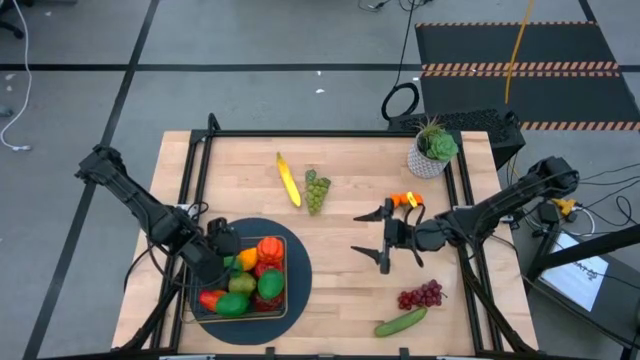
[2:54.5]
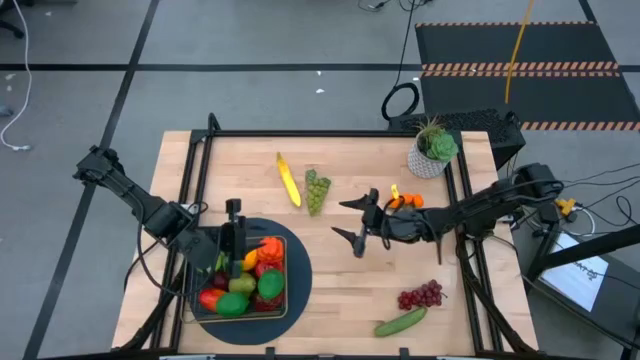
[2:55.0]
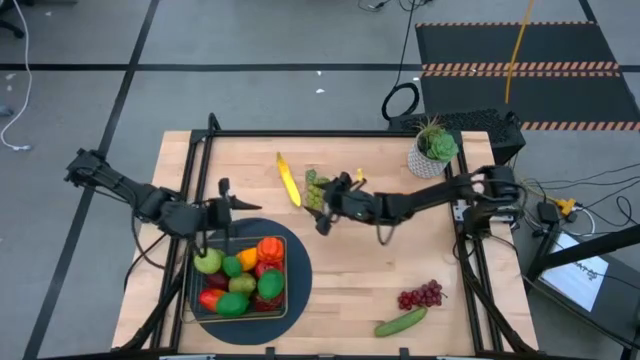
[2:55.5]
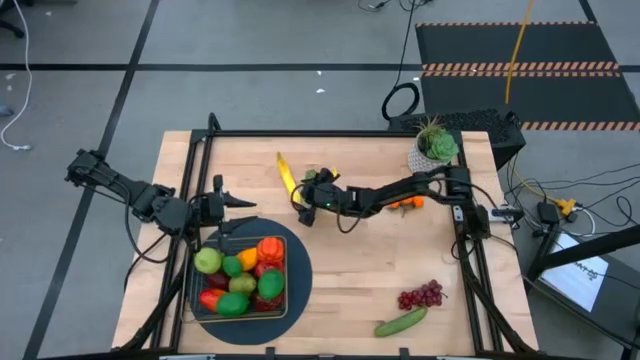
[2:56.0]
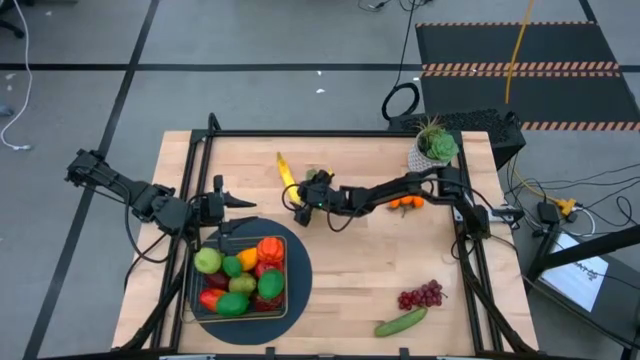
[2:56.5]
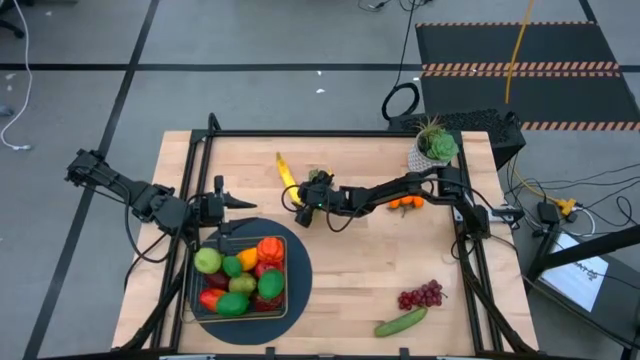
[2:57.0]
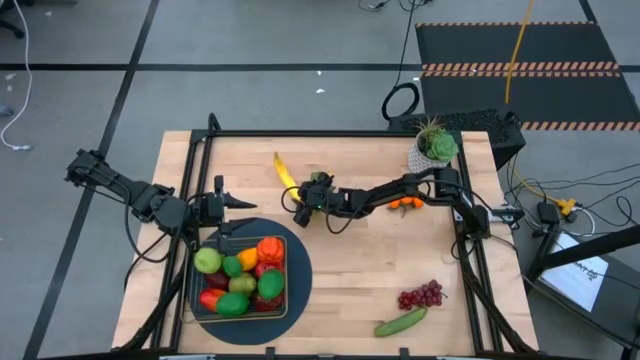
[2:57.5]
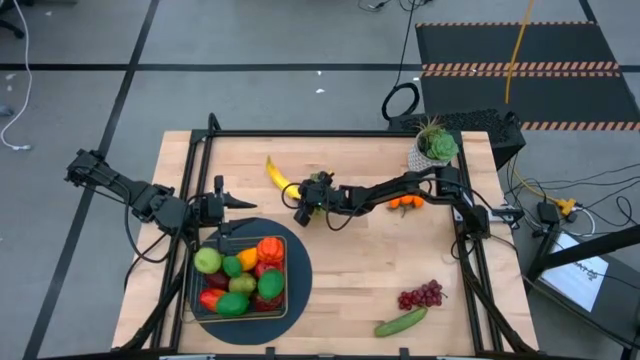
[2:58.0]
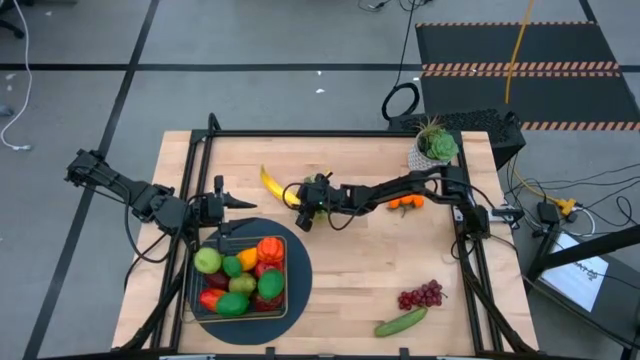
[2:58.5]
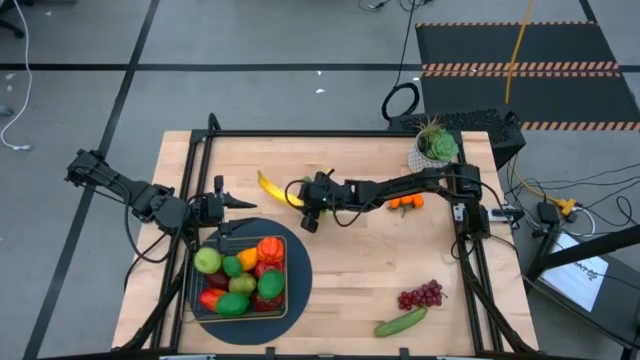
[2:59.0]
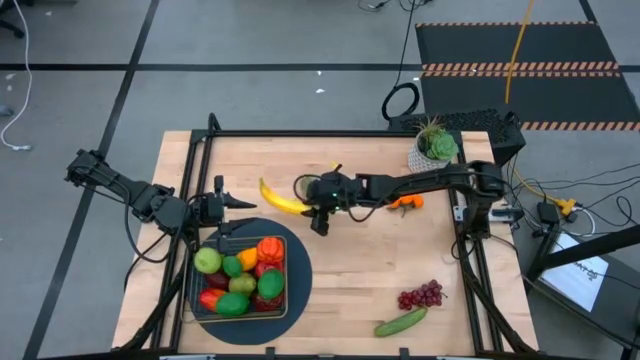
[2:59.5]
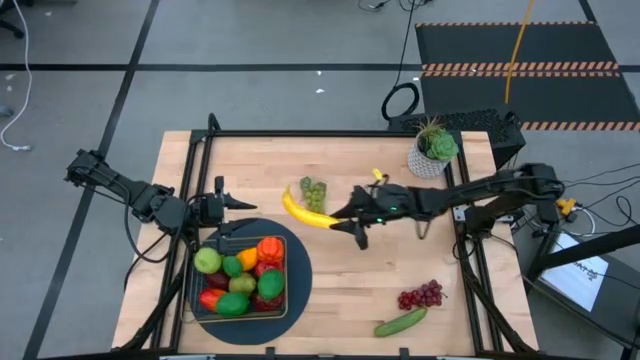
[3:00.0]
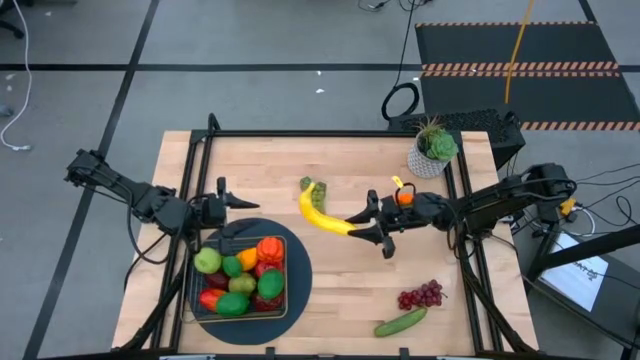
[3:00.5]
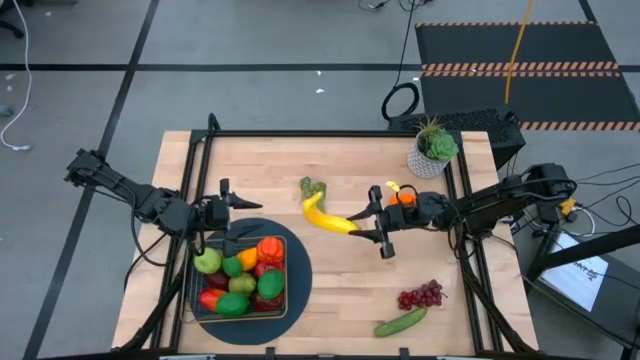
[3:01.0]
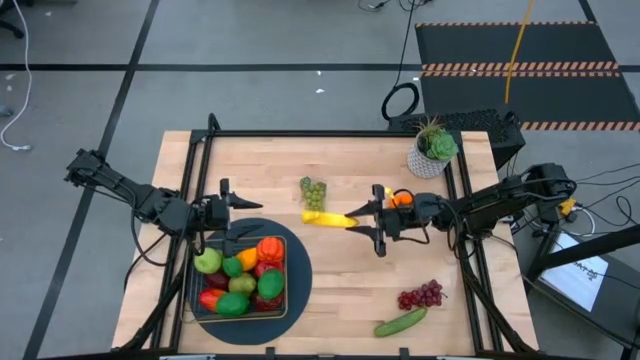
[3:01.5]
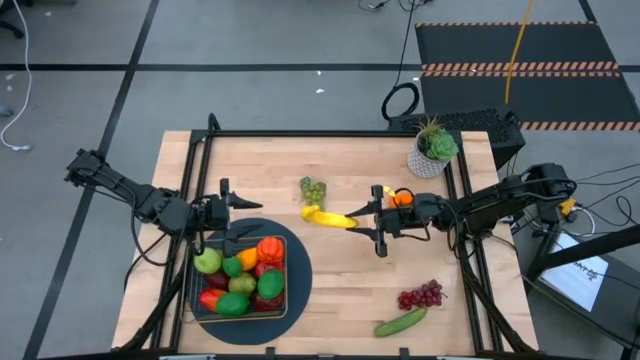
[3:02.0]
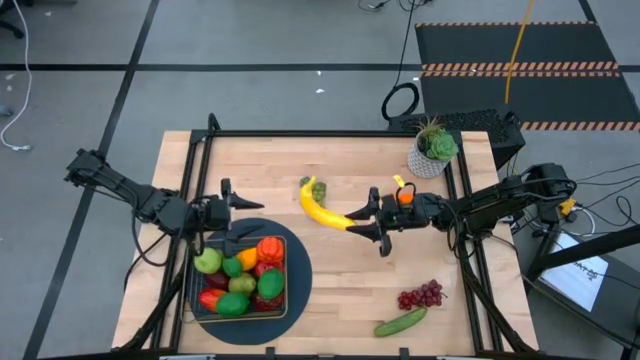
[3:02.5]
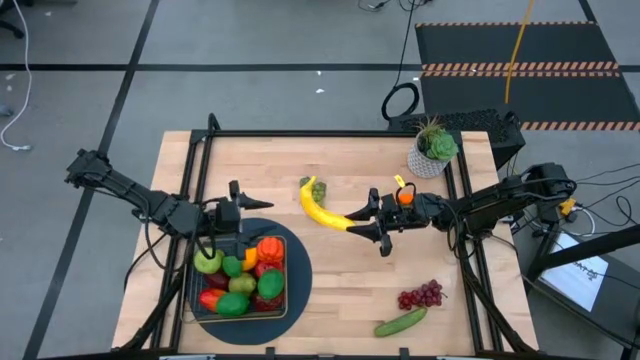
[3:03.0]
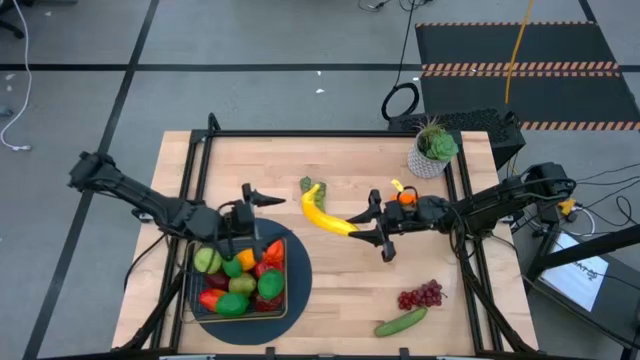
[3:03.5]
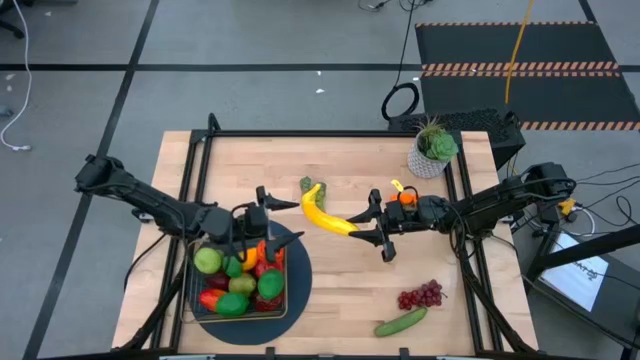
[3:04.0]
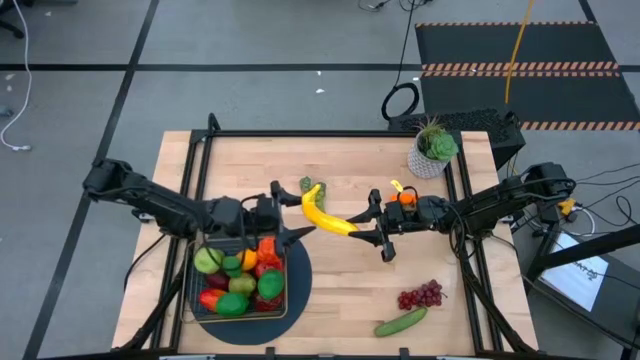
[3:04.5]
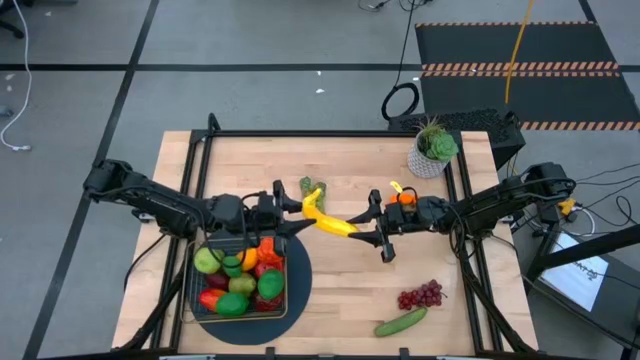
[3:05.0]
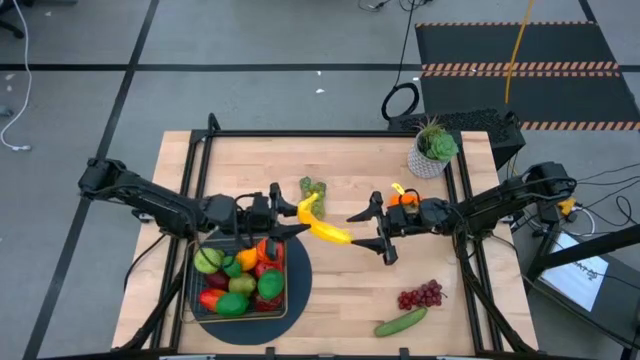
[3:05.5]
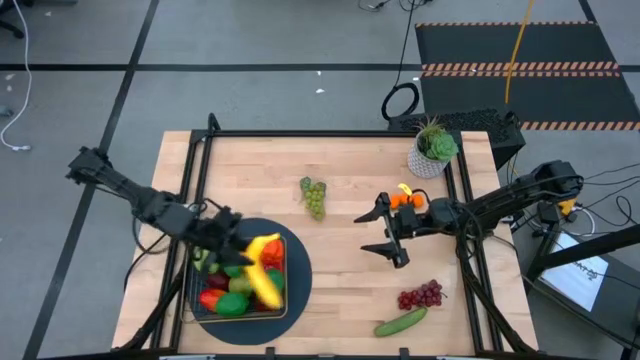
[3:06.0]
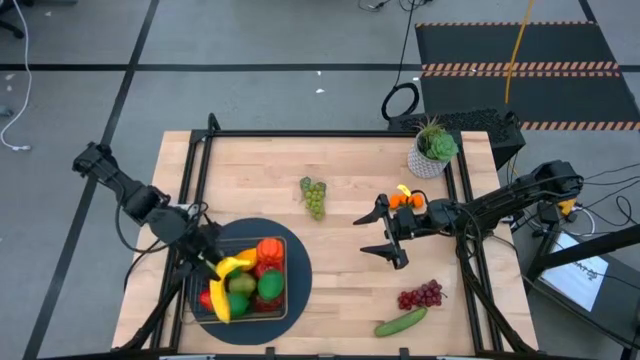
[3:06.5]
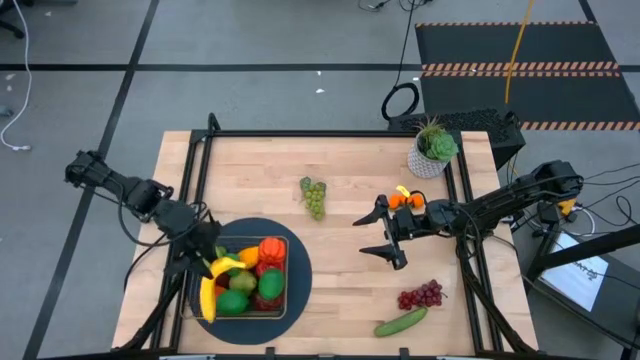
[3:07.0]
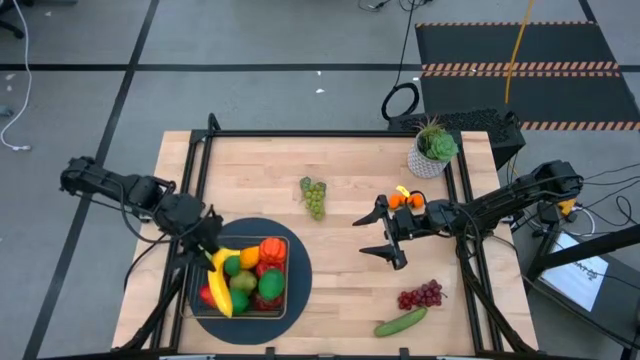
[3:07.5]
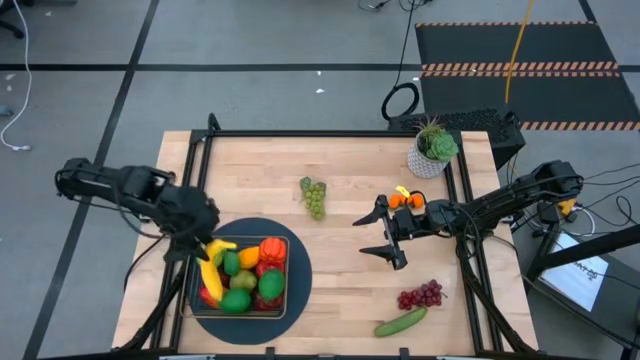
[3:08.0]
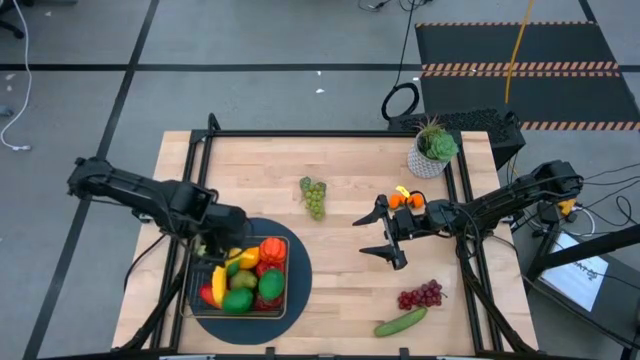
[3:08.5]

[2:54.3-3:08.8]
Task: Build produce basket
Put the banana into the gold wire basket

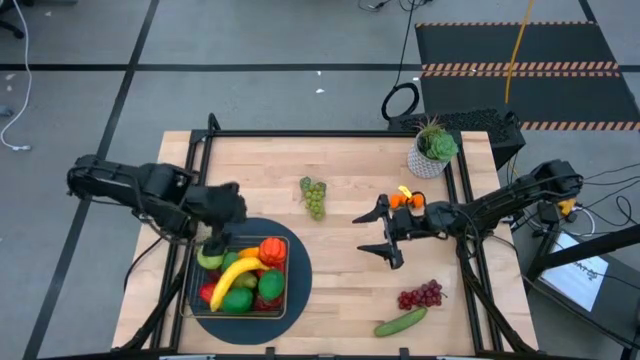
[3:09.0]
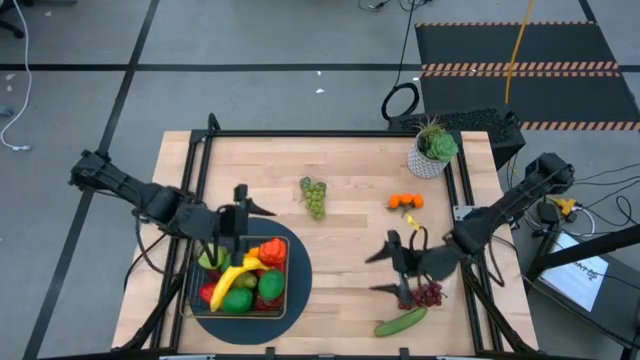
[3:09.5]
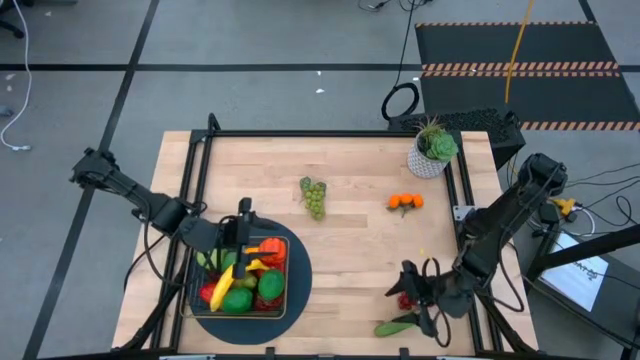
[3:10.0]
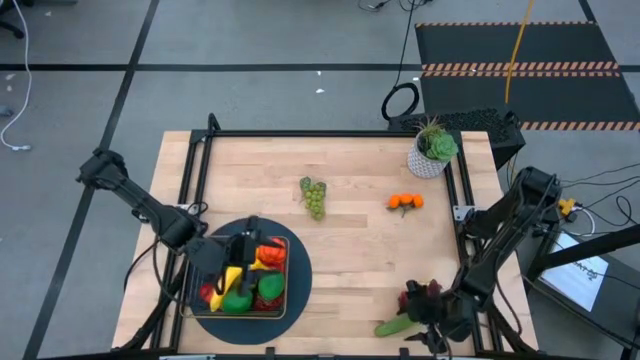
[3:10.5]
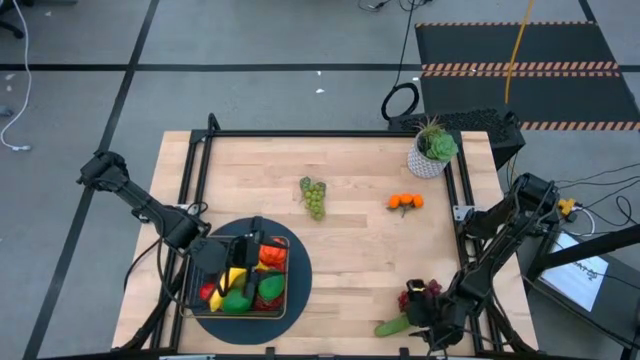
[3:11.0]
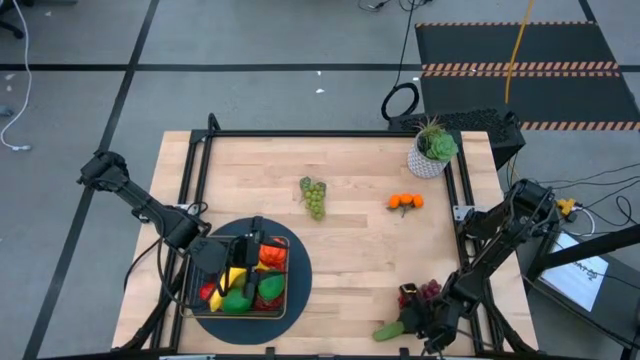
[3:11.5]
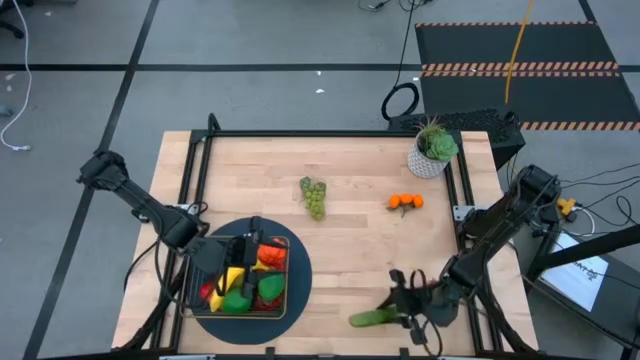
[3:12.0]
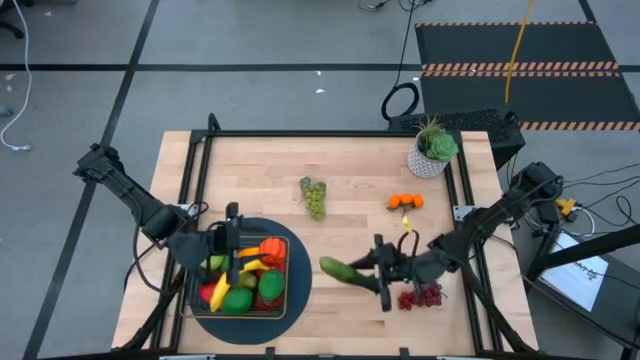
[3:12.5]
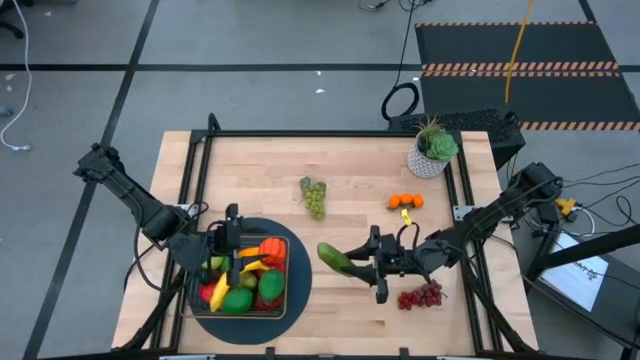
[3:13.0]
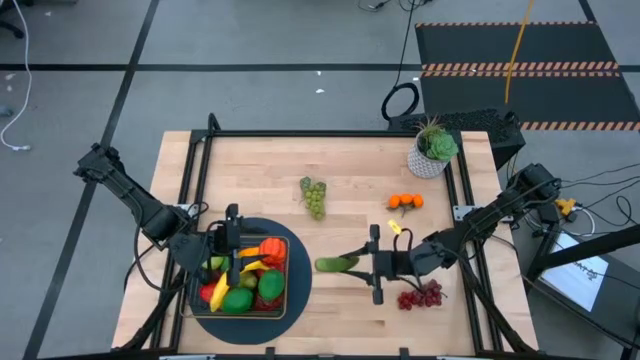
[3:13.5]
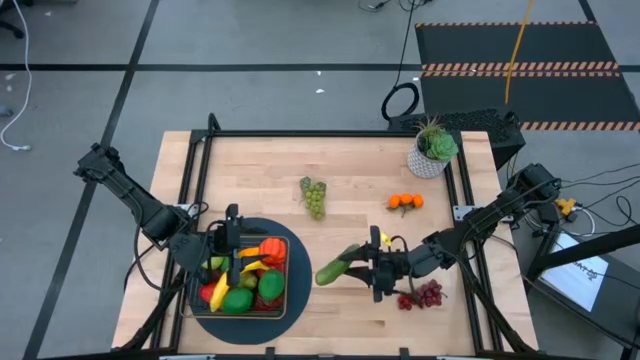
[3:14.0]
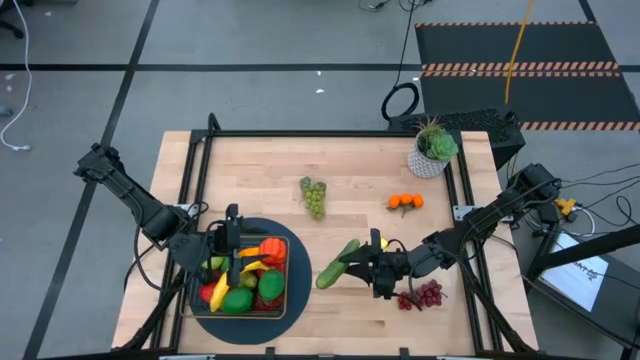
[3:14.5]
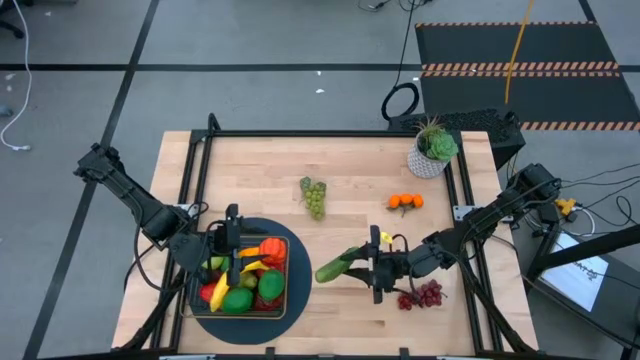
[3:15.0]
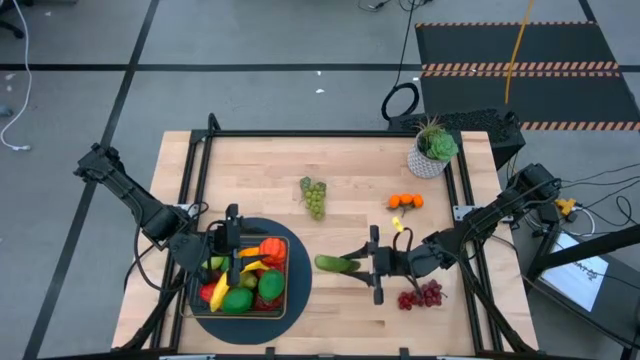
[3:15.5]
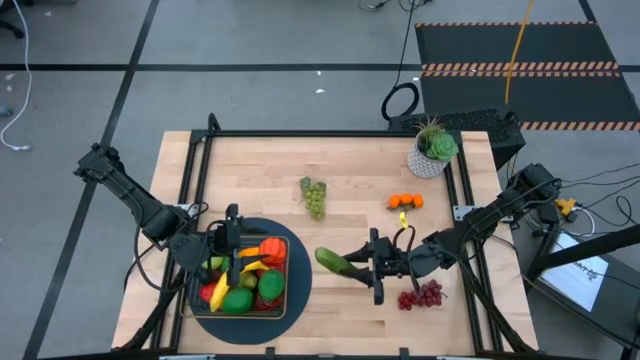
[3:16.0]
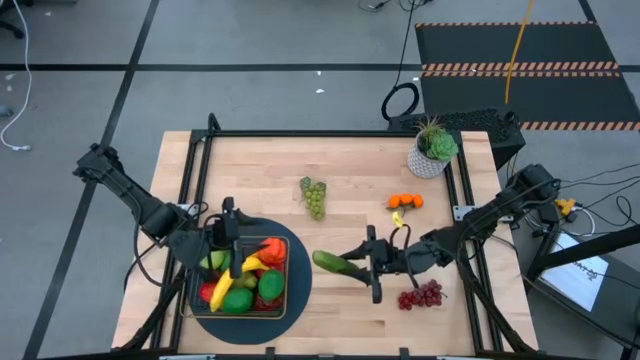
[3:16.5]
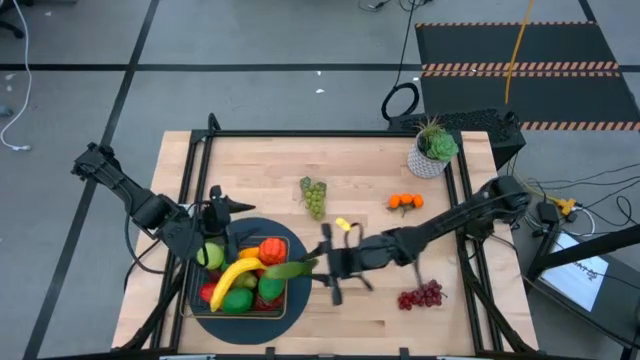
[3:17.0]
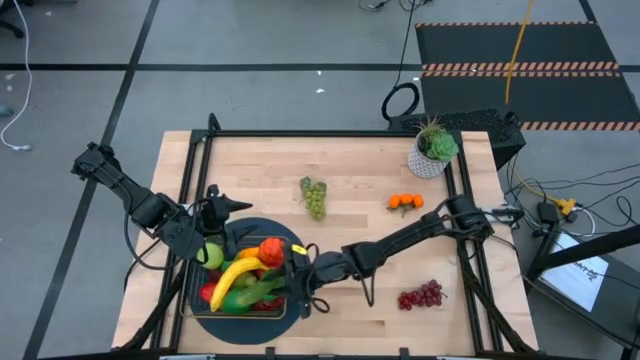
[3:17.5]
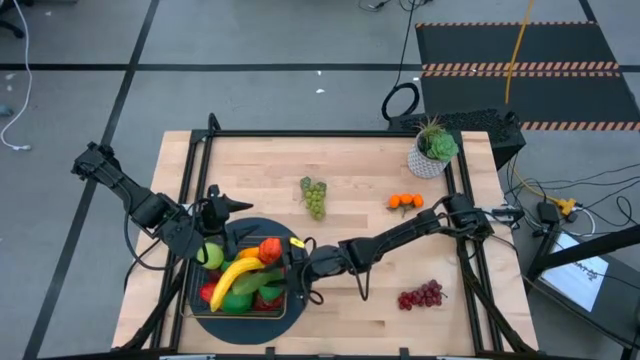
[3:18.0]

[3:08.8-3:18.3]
Put the cucumber into the gold wire basket
